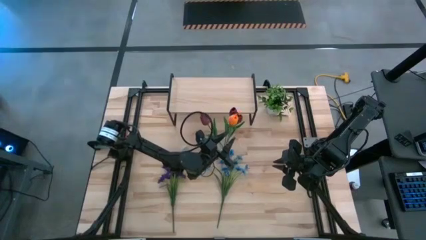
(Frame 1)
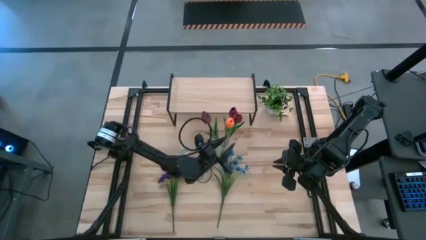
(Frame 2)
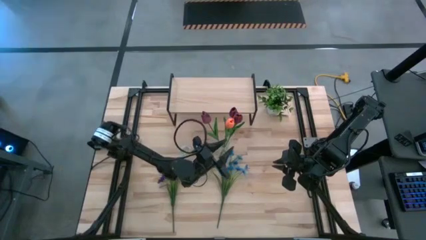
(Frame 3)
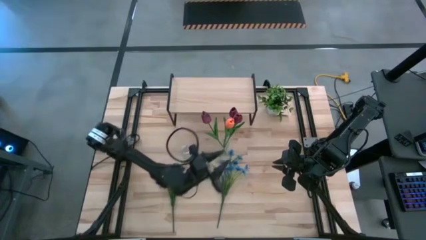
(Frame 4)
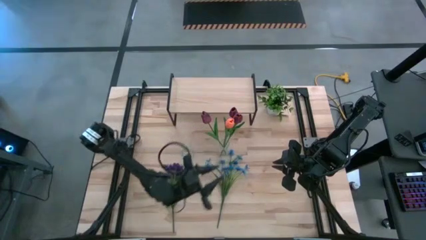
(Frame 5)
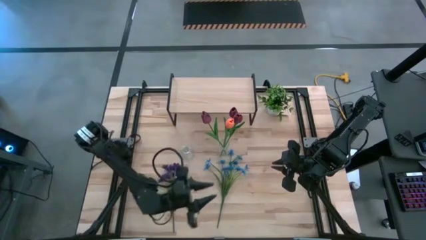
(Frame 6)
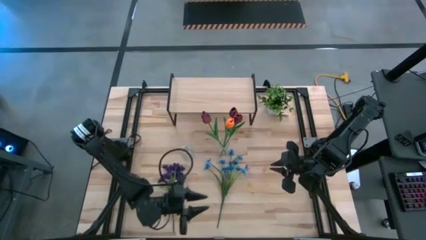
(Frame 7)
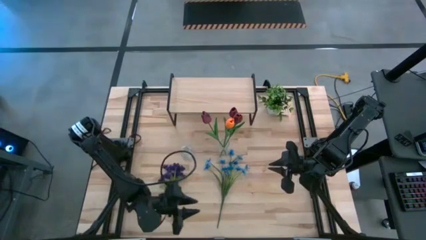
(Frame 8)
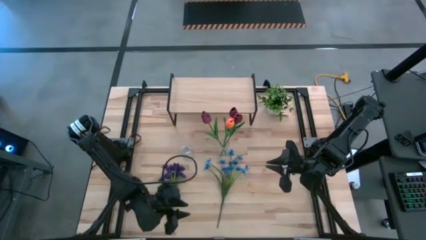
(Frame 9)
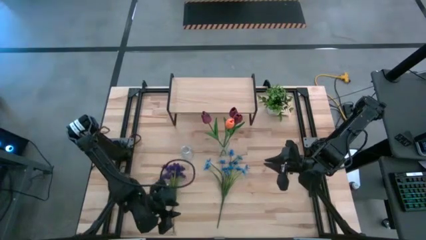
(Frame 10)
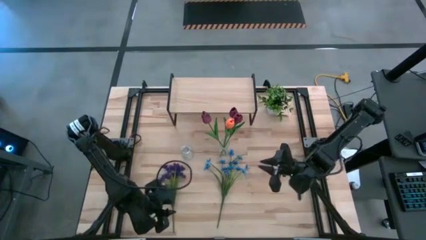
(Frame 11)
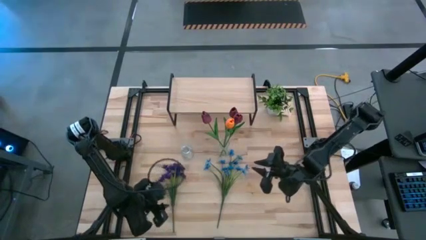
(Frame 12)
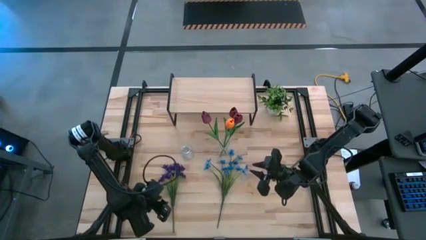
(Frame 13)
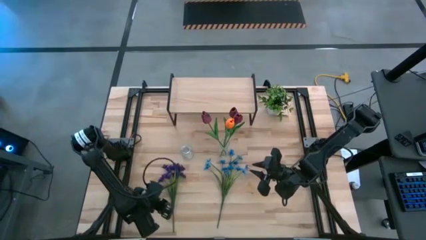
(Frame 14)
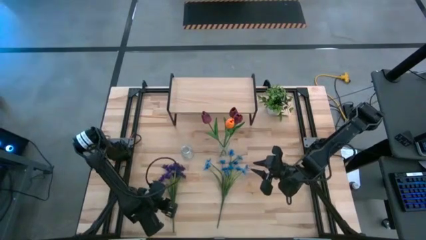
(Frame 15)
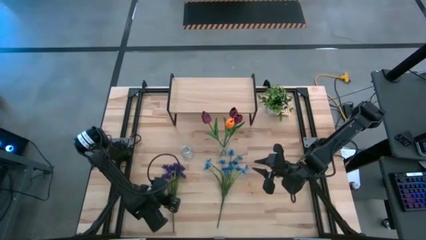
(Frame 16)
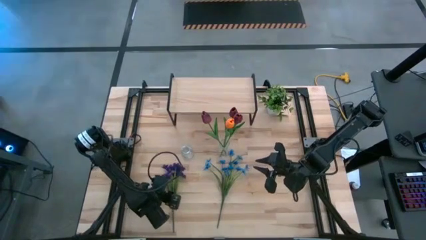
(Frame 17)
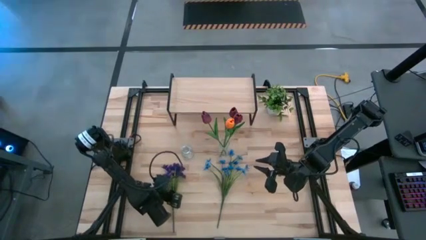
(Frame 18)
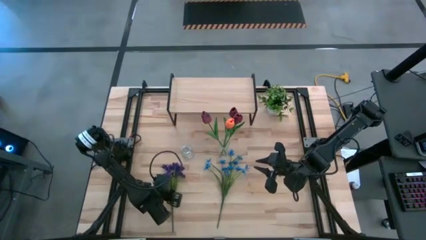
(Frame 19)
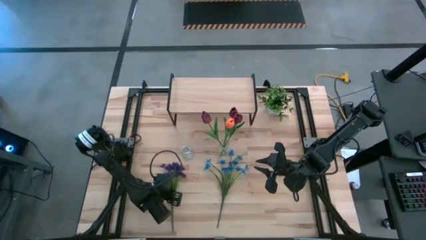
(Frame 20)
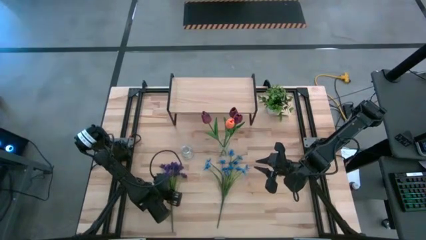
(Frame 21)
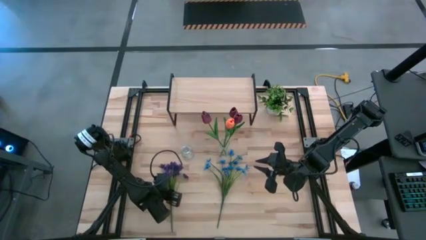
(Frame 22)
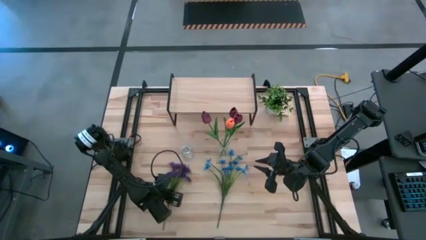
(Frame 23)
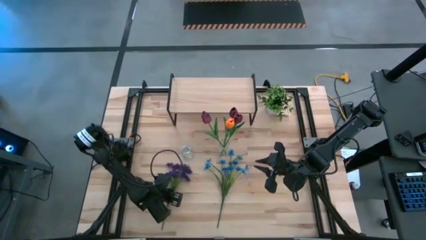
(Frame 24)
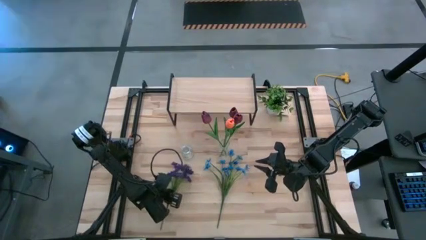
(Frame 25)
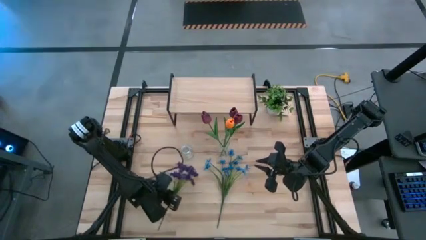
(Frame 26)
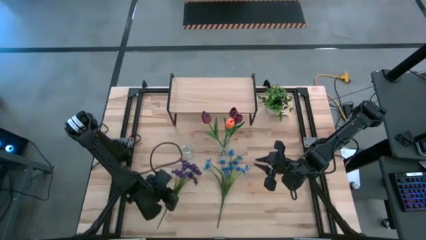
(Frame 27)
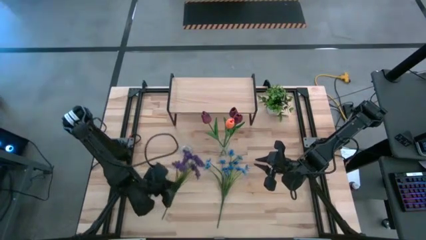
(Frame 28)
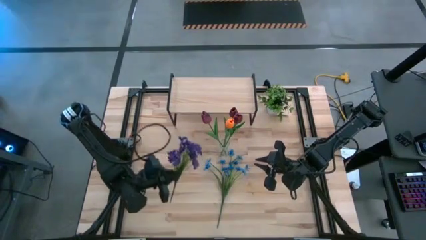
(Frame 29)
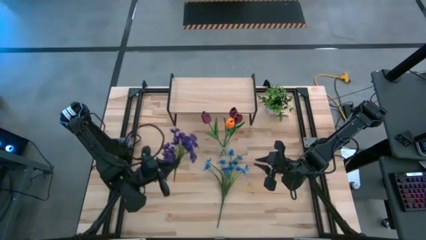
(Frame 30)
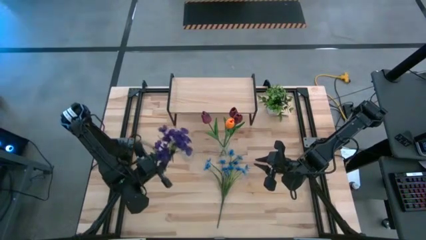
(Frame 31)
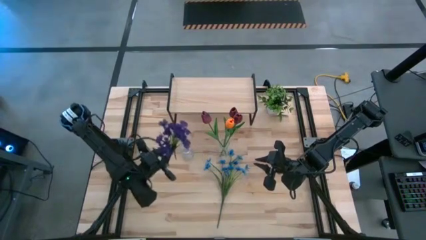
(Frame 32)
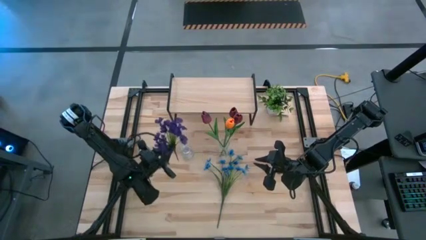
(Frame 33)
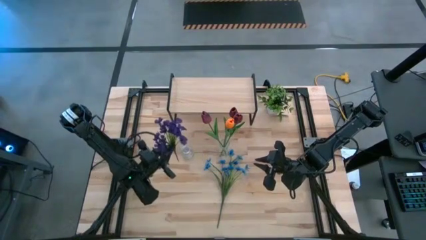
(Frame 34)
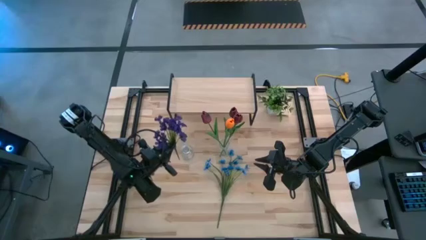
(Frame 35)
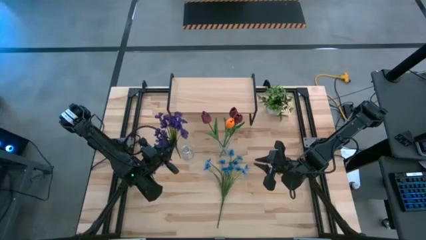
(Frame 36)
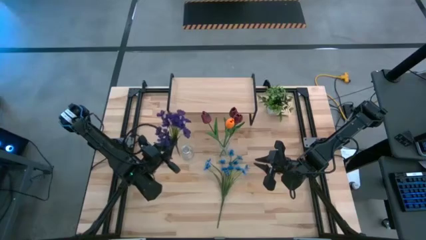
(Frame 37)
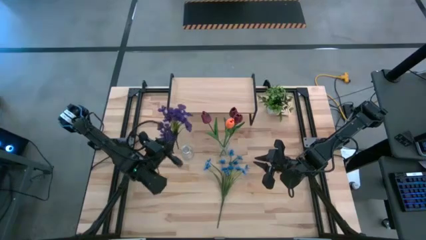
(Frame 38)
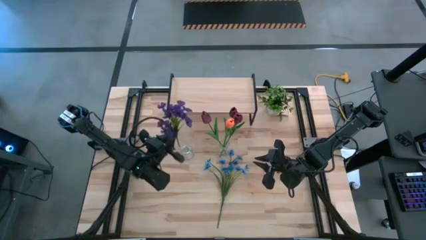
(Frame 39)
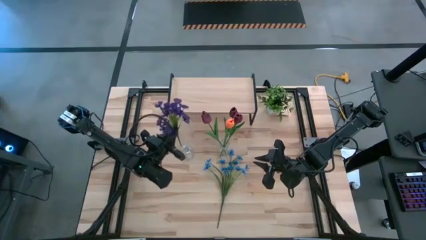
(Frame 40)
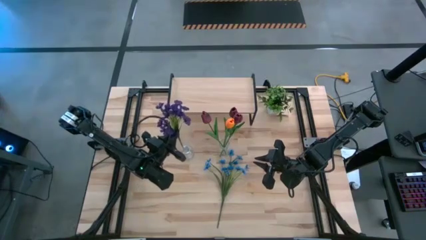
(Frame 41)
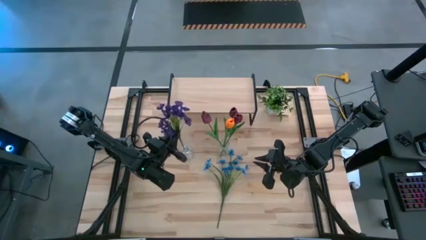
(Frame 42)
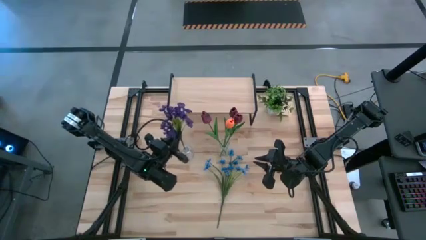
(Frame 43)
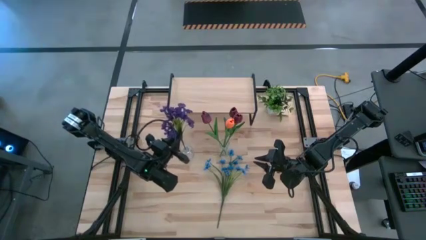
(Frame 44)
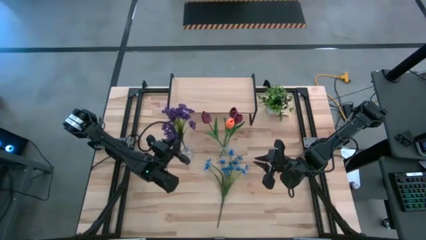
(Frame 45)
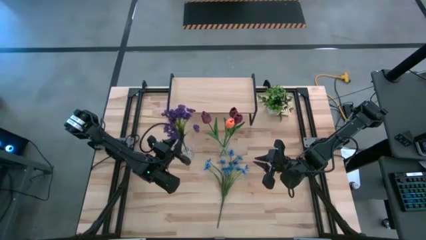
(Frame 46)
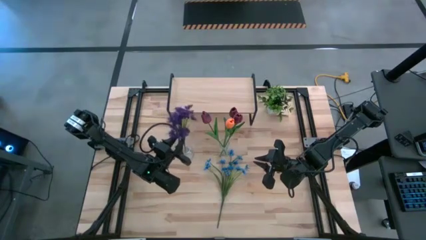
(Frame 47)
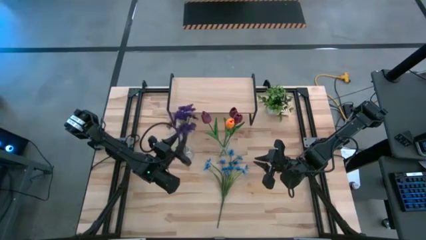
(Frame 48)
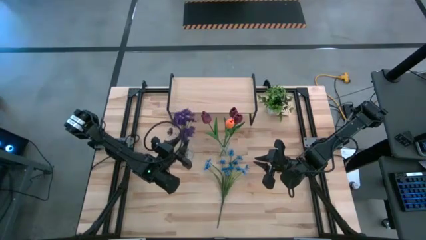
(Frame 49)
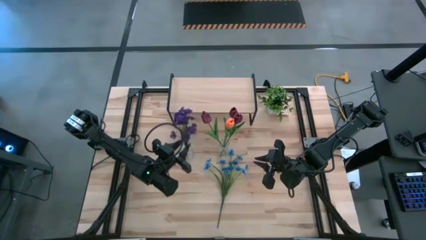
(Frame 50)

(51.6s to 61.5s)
Task: Pick and place flowers into a vace then onto a shelf
Put the violet orchid into the left transparent vase

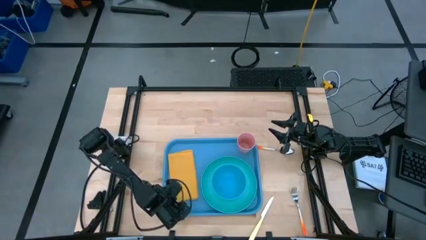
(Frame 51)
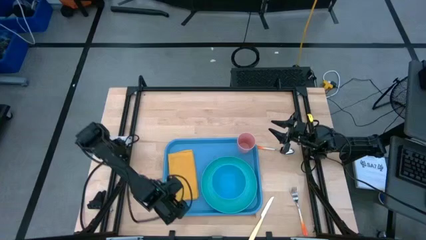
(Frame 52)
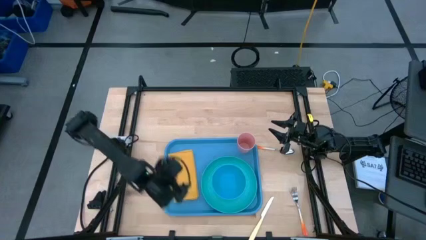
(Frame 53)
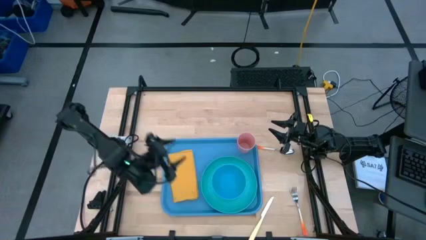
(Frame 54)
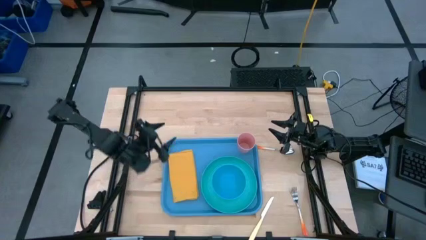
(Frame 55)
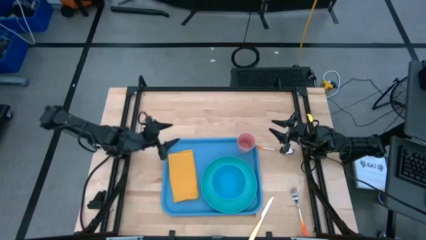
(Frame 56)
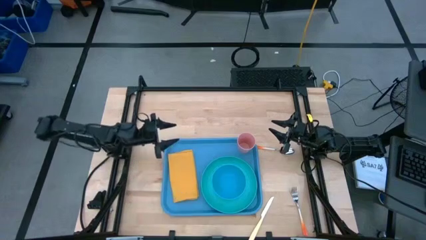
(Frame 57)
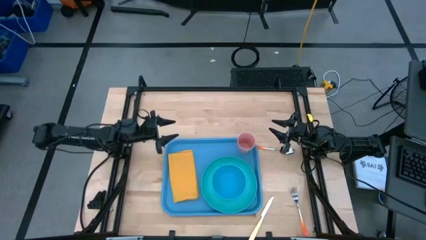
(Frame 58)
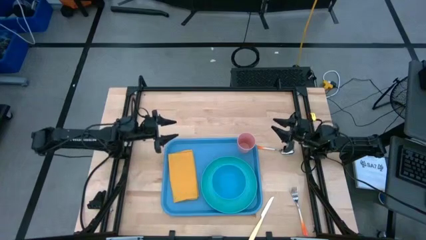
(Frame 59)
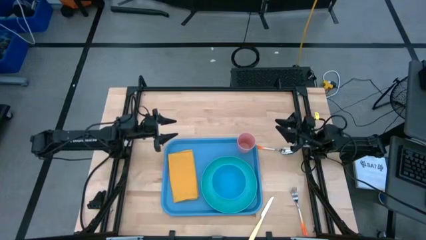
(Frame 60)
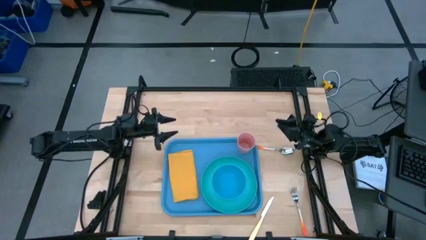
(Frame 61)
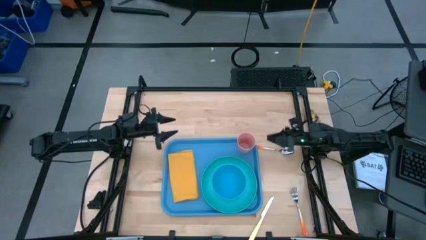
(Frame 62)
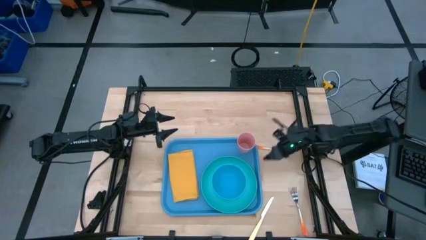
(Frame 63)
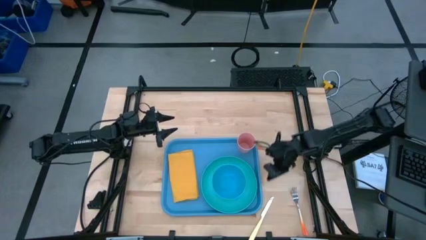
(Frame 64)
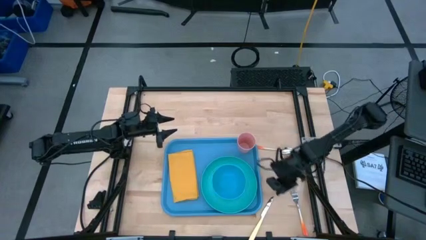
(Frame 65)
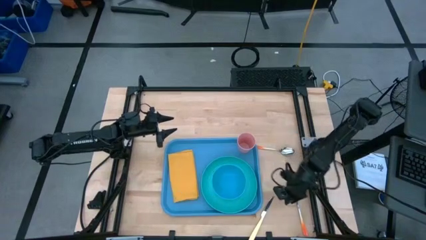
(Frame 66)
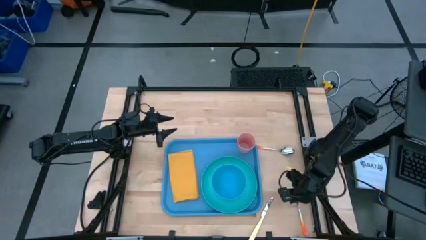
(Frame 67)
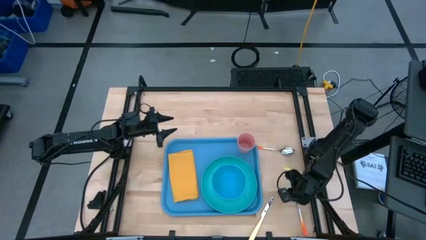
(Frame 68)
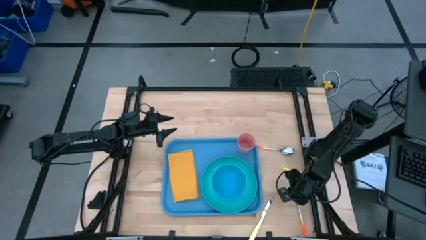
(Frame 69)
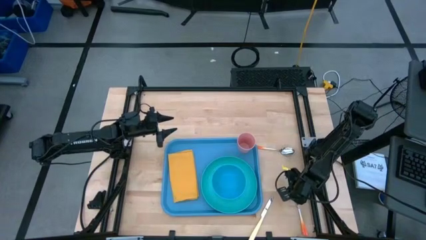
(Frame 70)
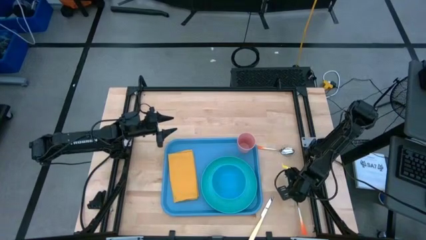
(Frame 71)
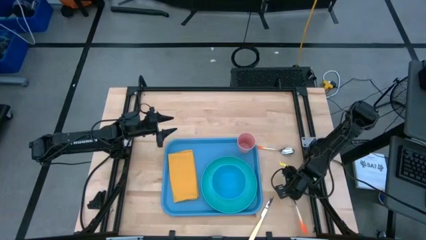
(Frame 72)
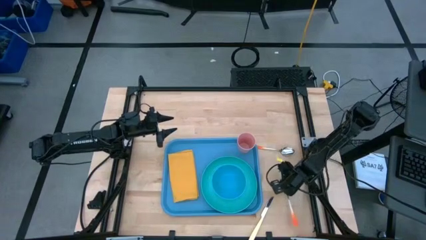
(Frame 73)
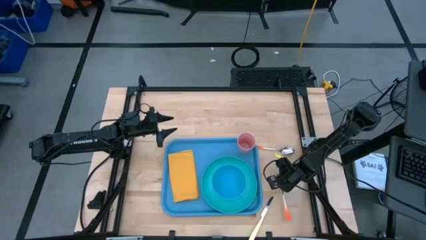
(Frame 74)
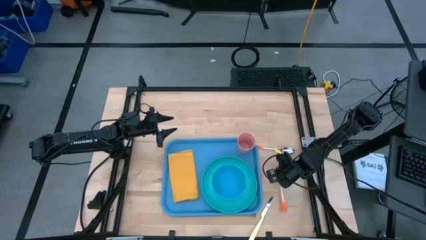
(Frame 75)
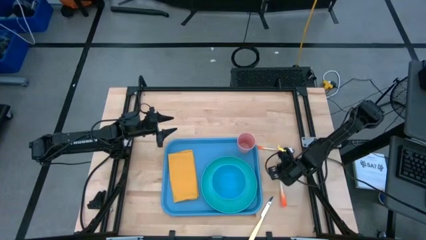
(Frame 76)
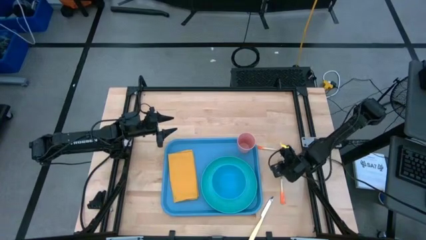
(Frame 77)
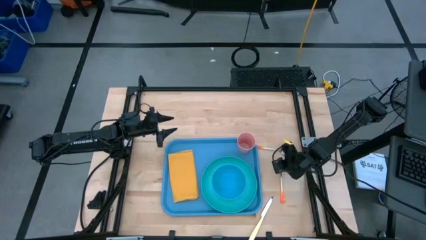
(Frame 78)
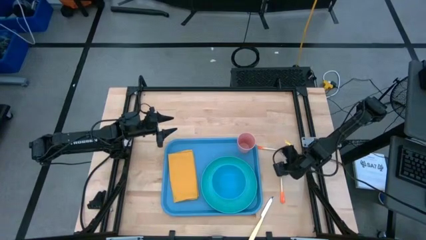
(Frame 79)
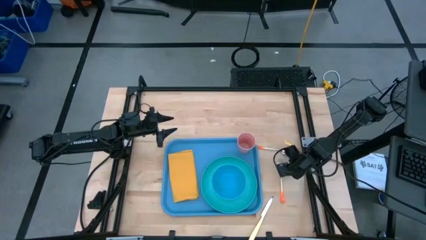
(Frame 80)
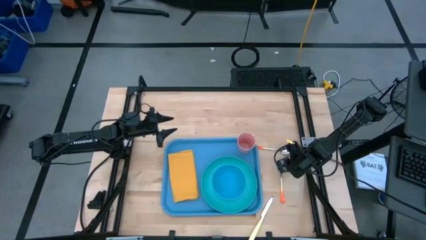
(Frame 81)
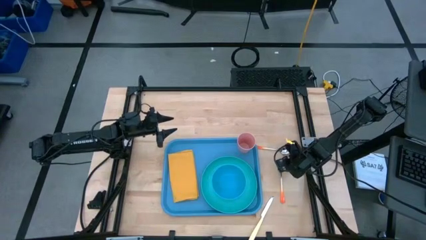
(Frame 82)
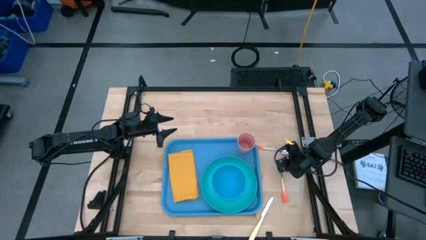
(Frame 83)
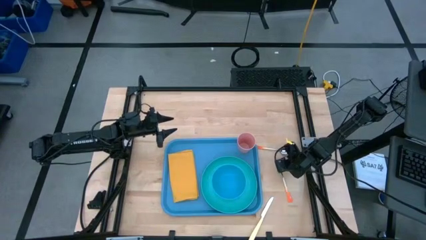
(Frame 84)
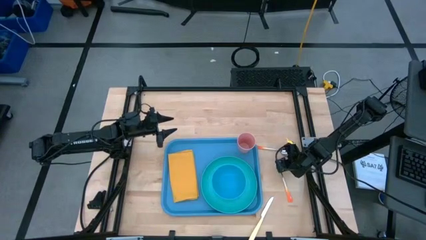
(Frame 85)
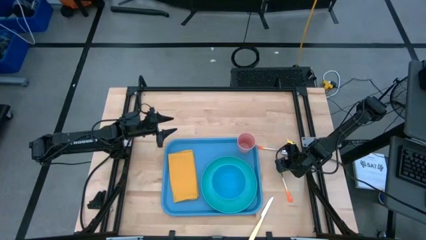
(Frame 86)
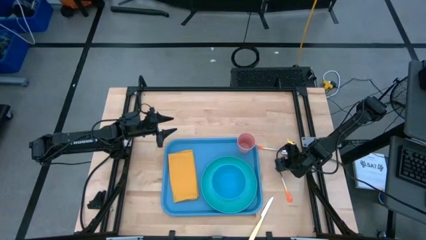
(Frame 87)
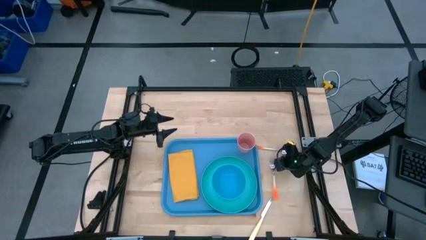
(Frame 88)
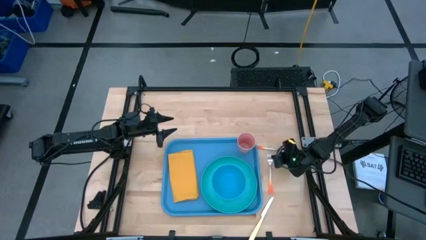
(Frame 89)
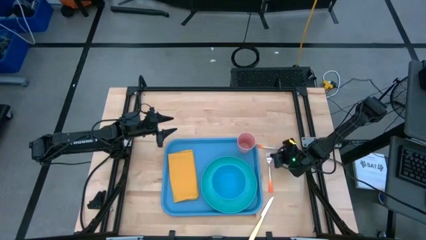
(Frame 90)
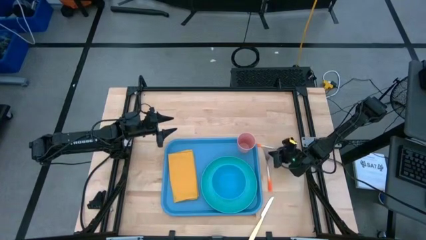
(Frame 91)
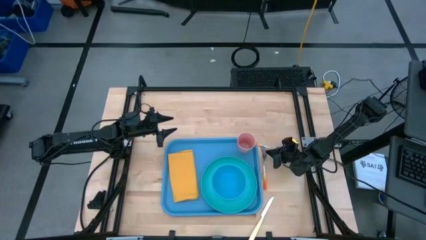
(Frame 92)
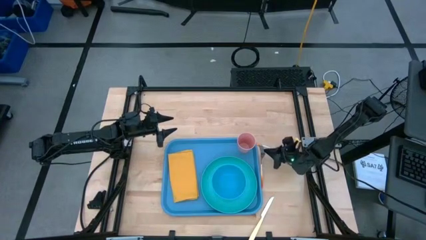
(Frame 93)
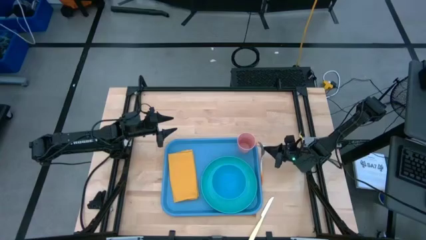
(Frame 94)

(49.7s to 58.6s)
Task: Set up tray
Put the orange fork on the yellow napkin
